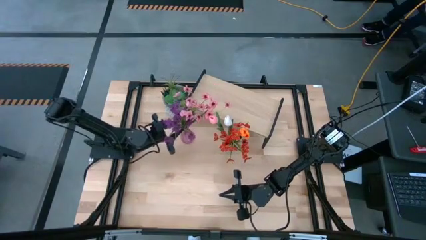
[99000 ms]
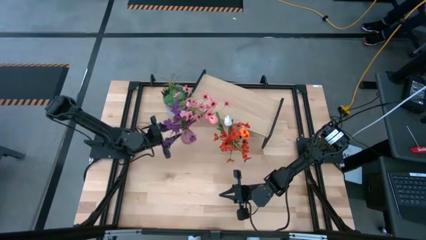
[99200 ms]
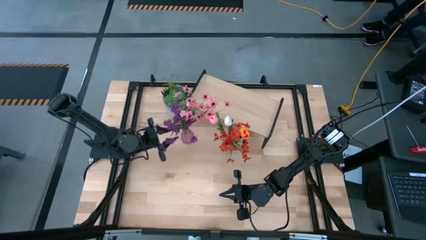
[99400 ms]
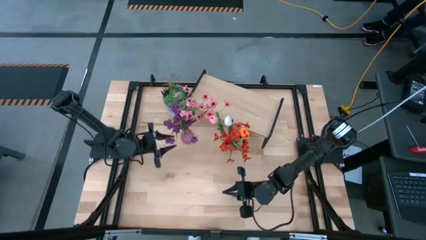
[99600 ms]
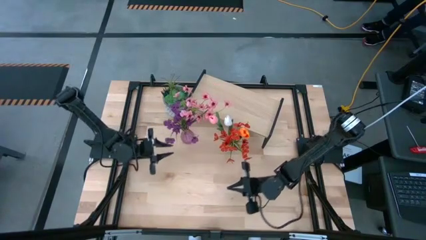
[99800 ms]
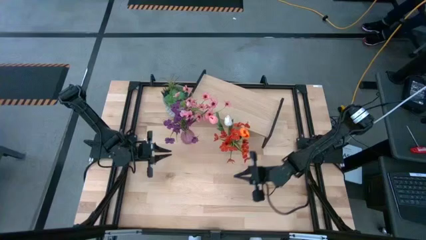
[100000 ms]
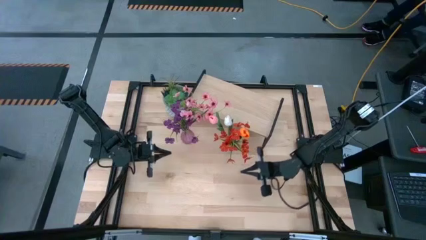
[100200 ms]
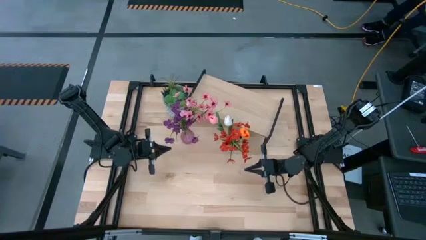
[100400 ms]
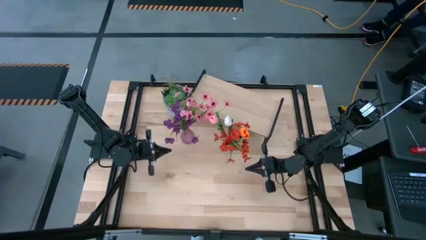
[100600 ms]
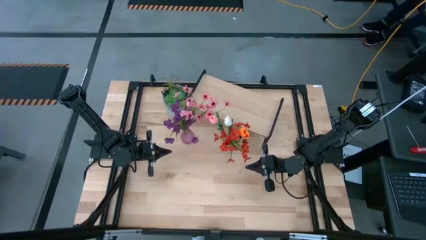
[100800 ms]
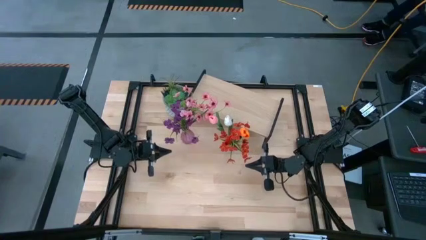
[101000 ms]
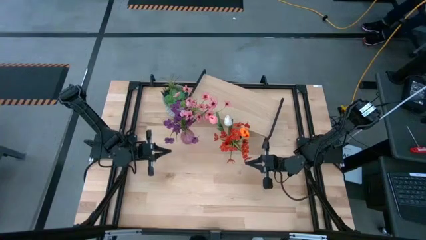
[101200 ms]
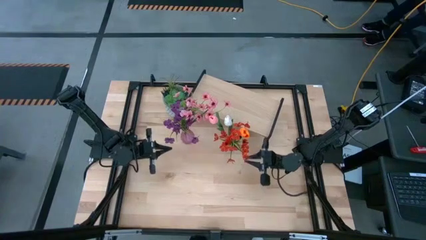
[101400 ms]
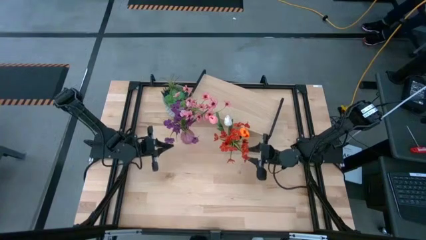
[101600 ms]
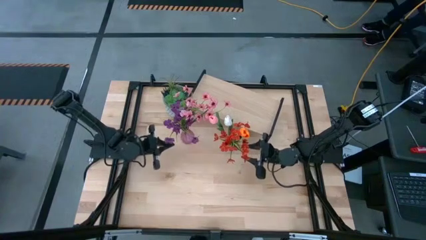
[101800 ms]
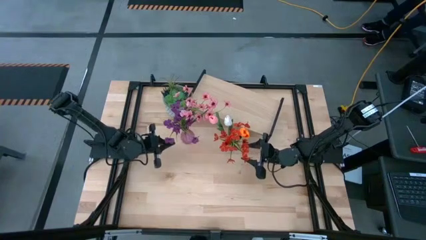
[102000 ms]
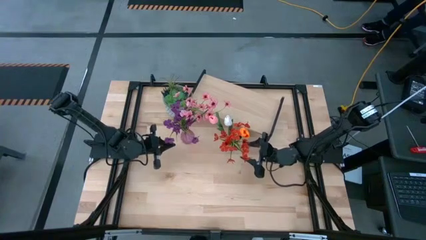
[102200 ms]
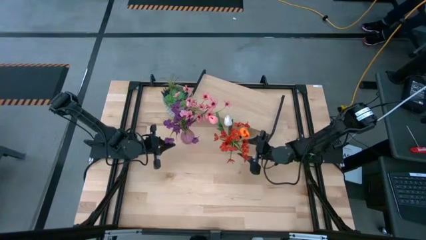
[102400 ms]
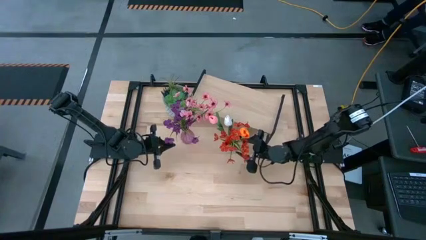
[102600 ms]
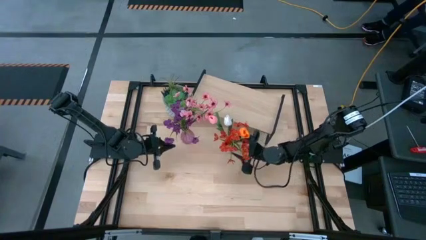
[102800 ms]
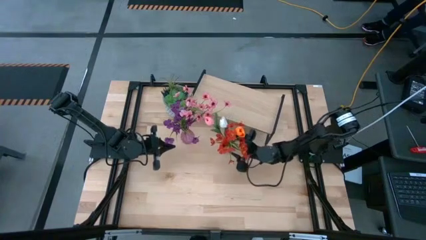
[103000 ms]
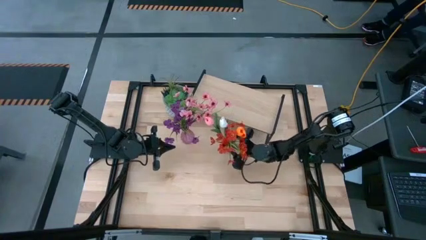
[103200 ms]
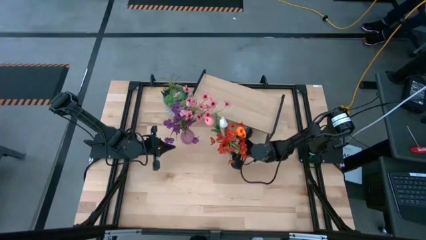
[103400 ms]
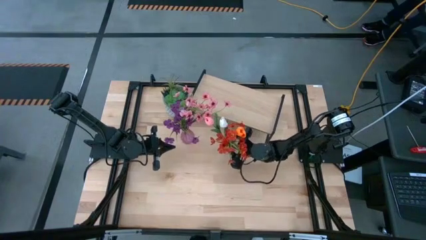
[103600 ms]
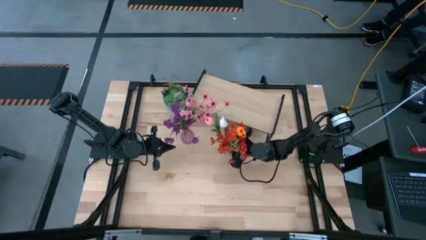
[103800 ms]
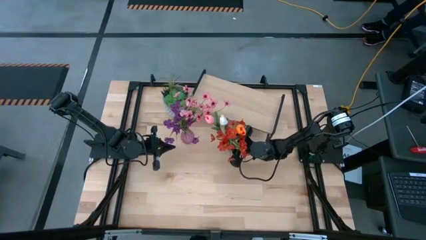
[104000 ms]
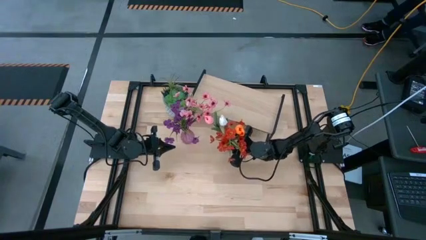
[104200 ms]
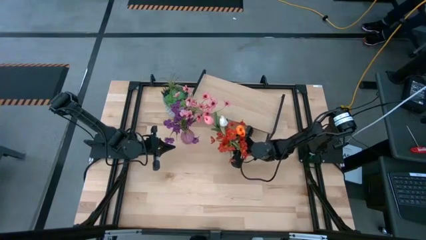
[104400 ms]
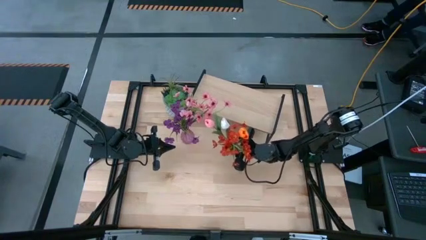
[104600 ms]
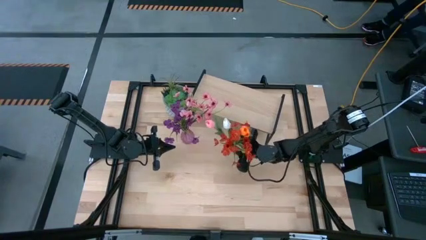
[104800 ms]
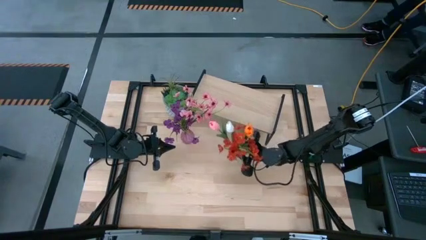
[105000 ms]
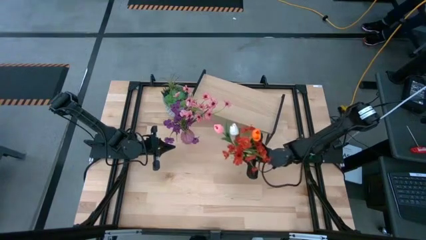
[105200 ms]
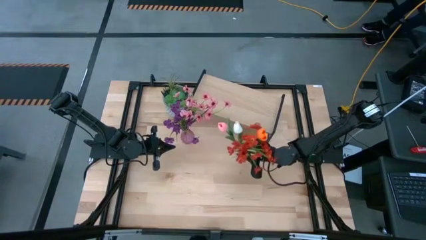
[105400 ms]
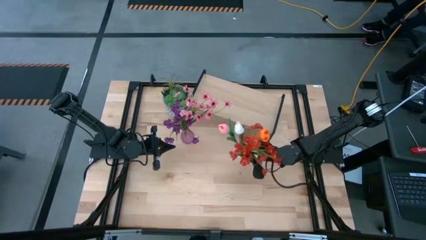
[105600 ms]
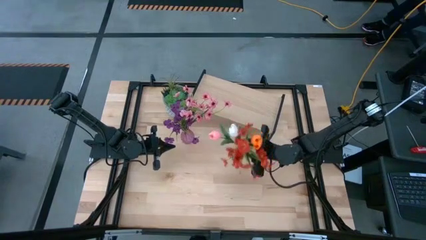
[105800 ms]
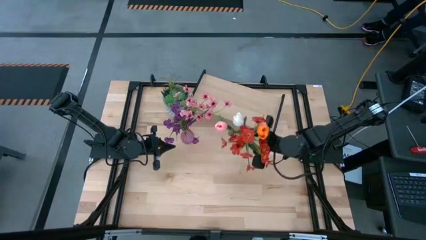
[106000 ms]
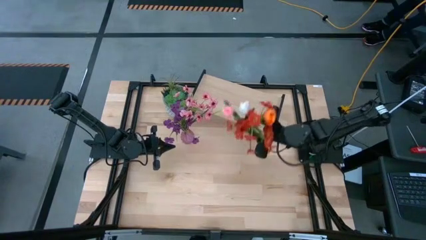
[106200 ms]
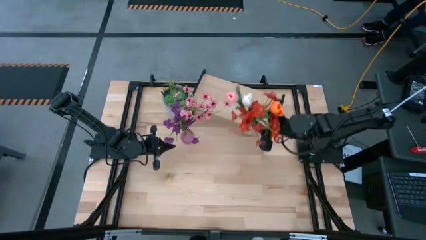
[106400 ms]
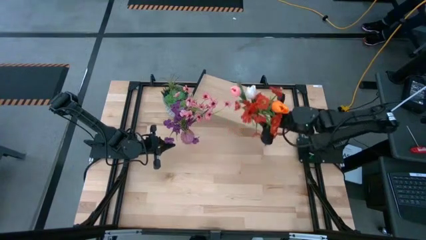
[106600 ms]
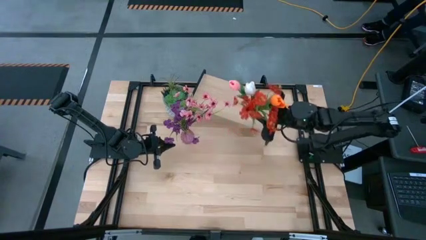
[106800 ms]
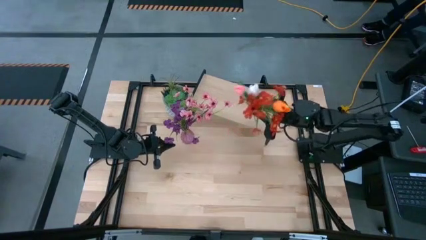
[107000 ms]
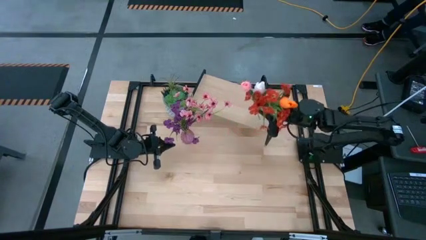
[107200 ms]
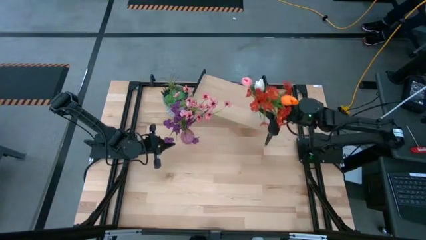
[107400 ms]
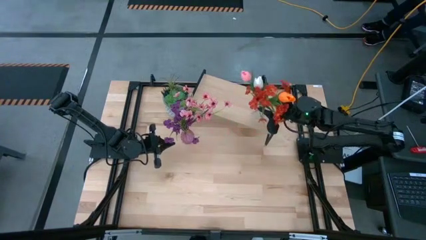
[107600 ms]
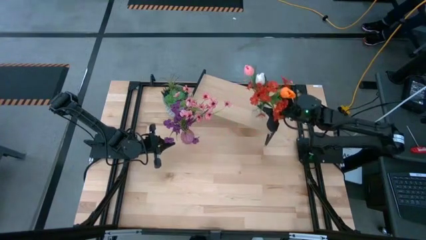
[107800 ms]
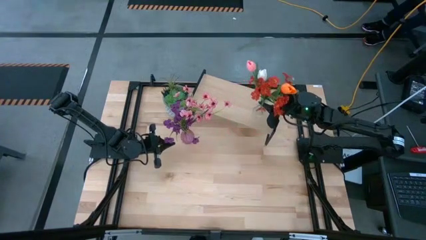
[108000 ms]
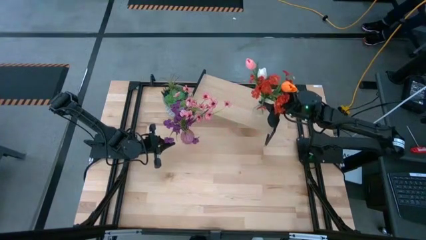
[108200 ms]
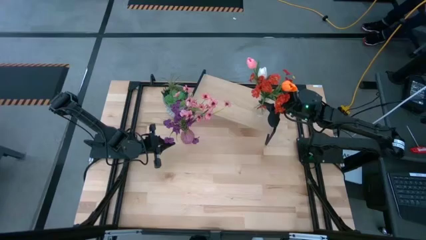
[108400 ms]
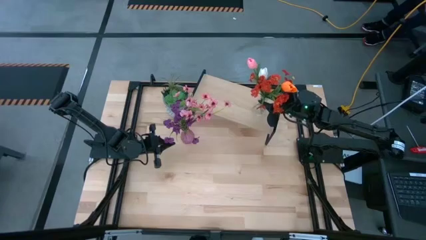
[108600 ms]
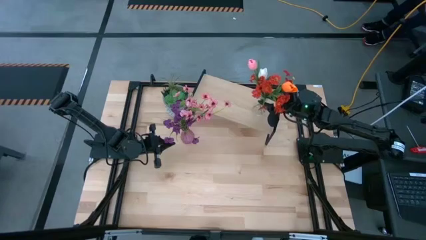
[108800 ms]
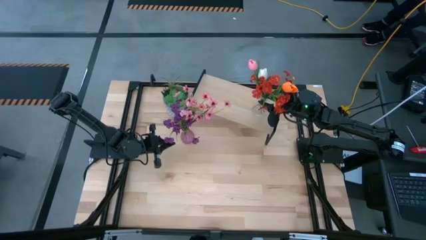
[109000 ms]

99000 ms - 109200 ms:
Task: Pick and place flowers into a vace then onto a shelf
Put the transparent vase on the shelf

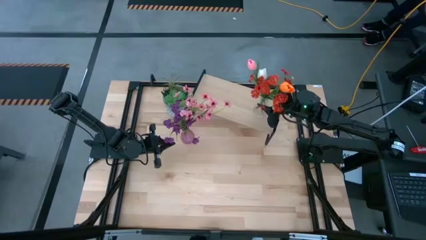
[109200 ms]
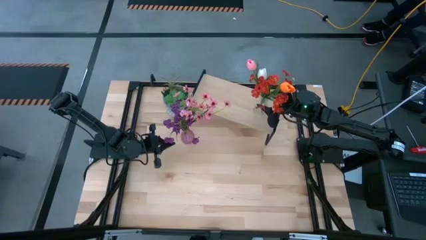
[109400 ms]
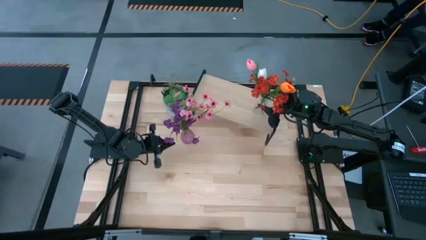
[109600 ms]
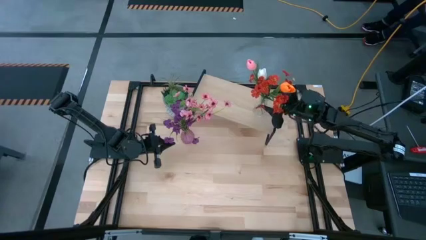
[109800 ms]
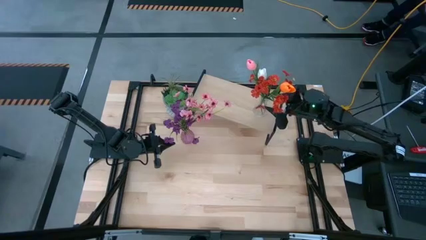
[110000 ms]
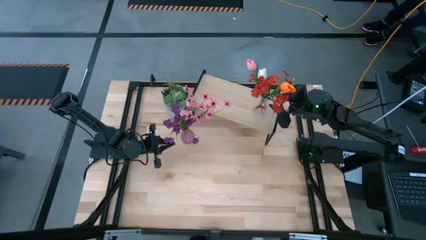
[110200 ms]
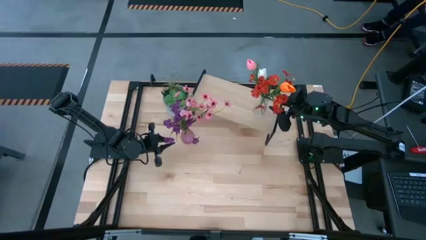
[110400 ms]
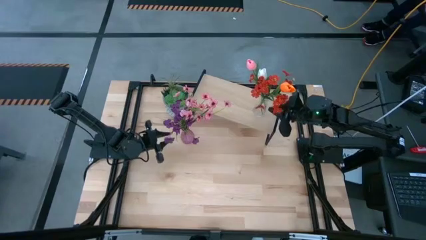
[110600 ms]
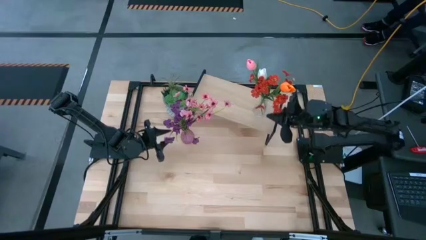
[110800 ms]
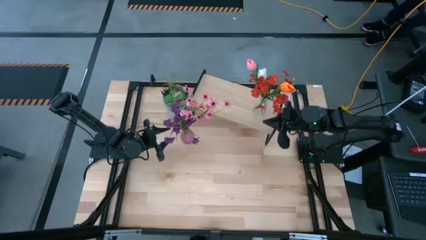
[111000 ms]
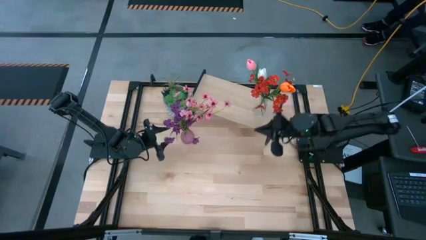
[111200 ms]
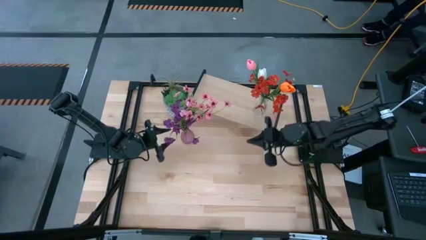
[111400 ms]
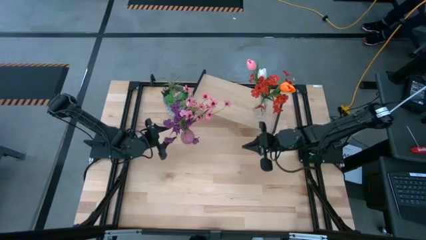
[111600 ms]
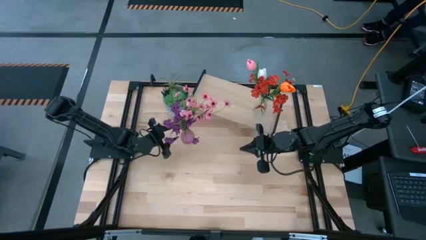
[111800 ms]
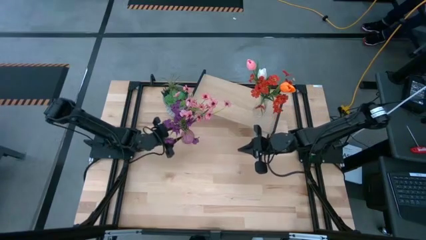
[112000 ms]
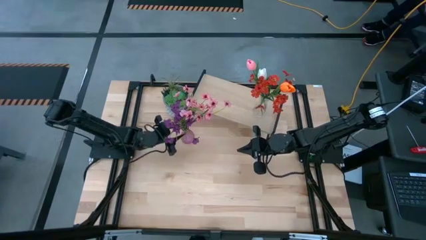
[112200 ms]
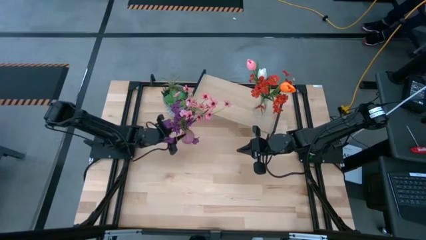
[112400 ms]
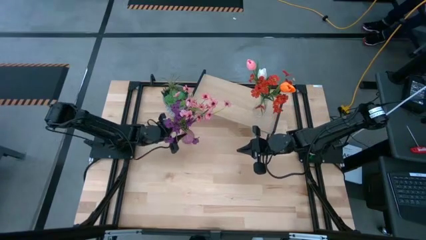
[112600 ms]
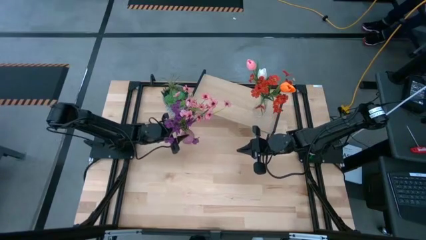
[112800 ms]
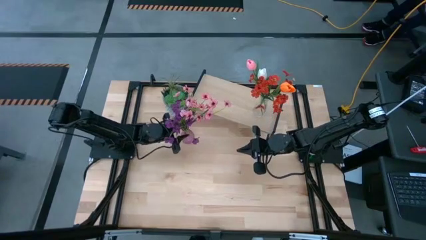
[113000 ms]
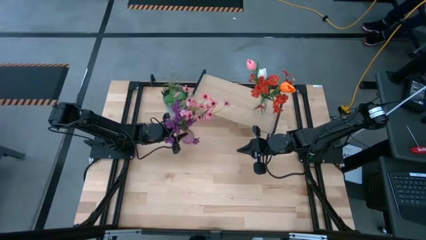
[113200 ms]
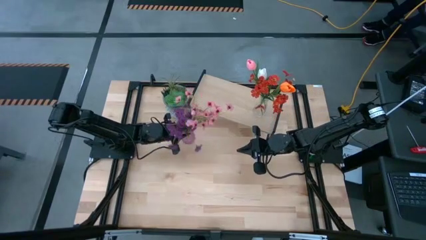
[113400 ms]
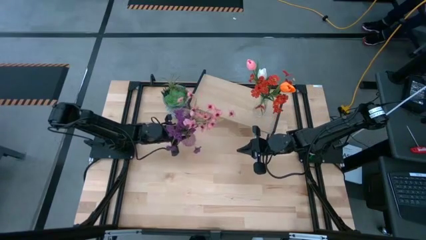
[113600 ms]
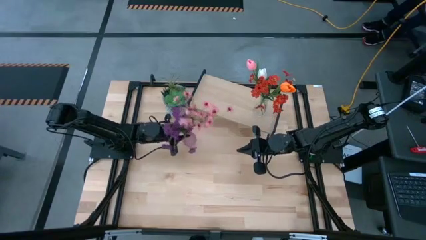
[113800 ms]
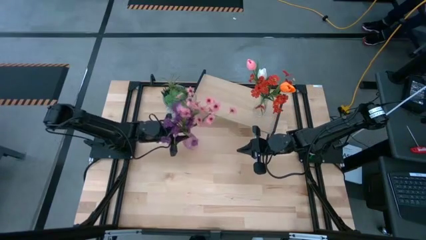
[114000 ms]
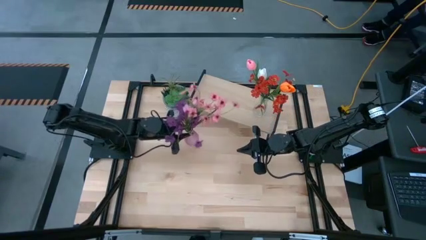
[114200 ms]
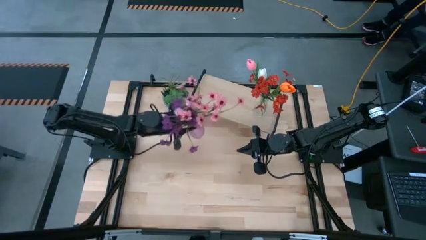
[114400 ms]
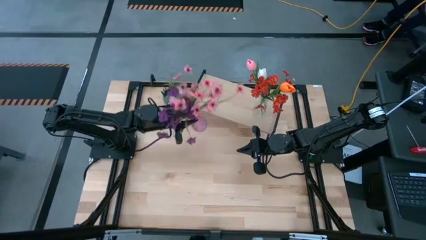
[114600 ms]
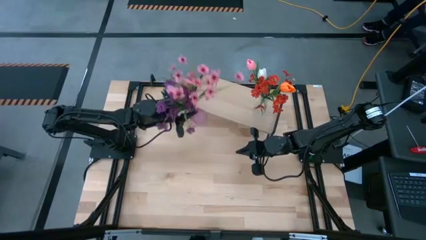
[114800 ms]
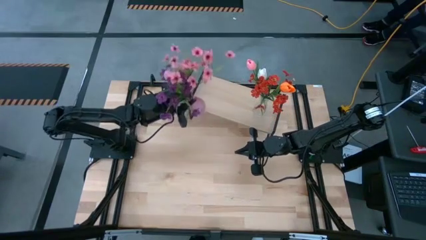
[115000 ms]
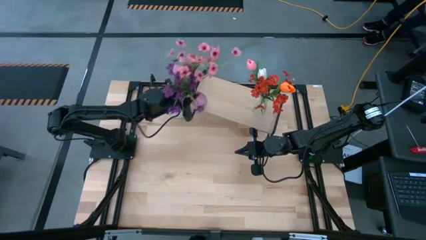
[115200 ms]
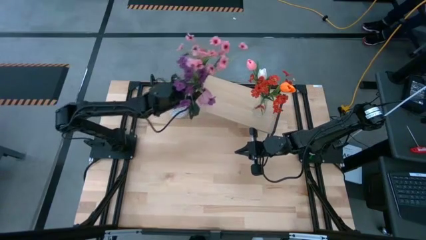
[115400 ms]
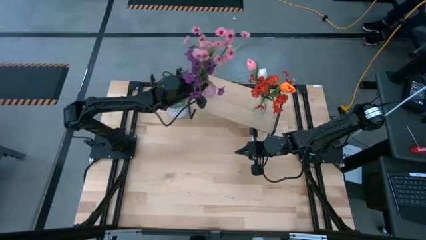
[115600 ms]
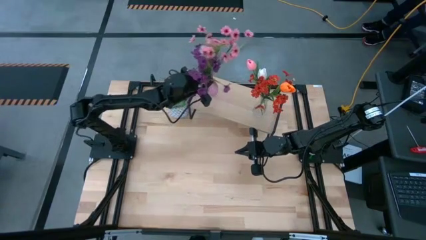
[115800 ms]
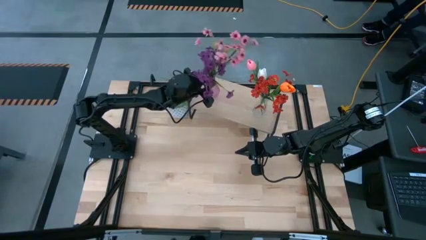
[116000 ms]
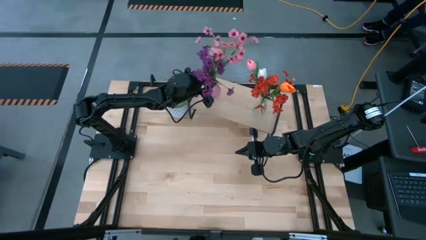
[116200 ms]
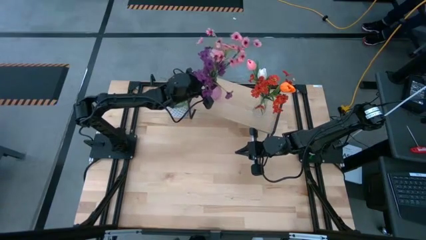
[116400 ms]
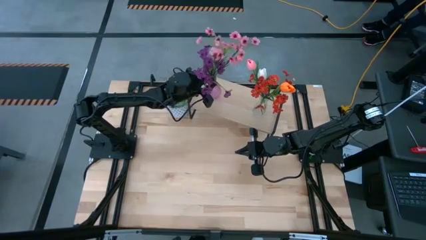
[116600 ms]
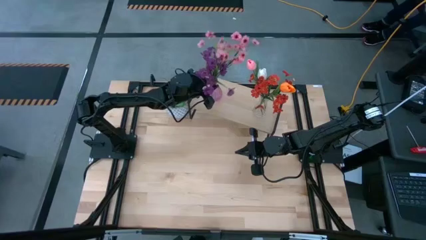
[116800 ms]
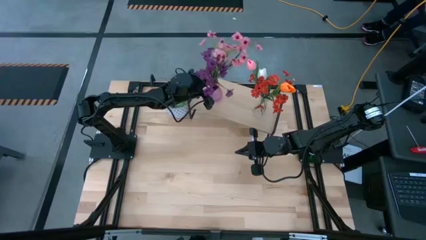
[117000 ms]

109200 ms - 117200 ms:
Put the pink vase on the shelf
